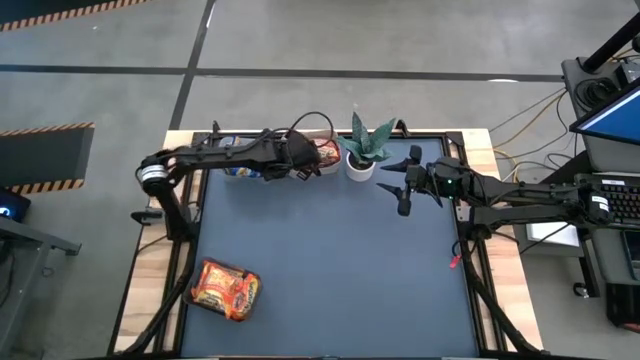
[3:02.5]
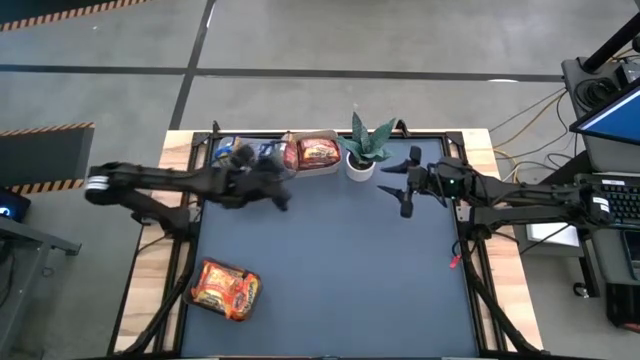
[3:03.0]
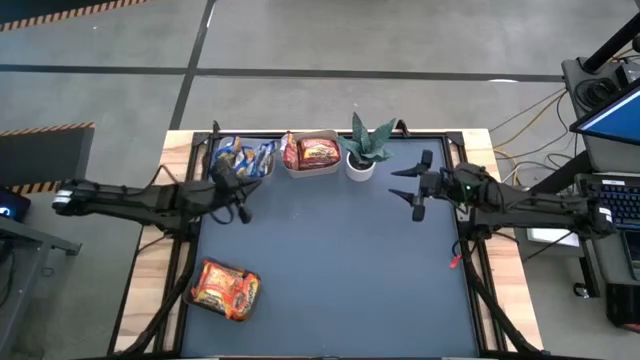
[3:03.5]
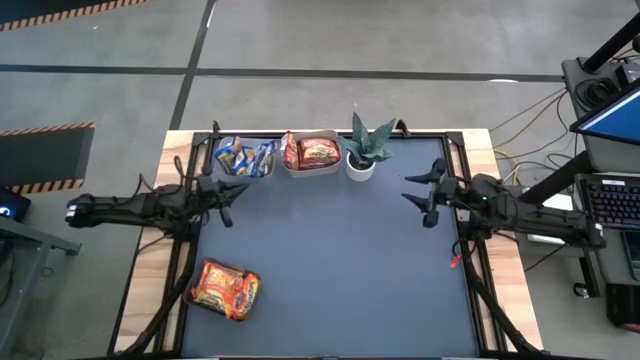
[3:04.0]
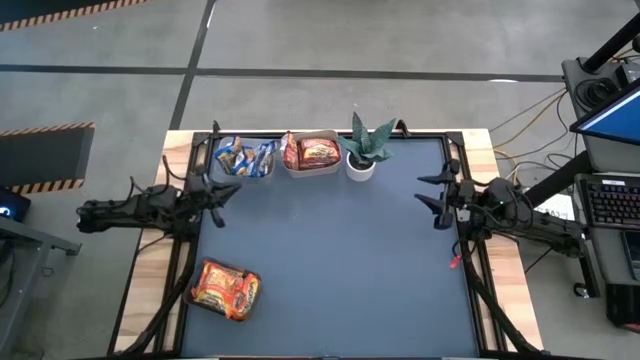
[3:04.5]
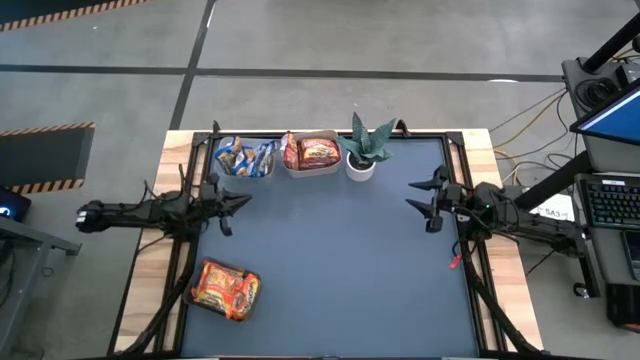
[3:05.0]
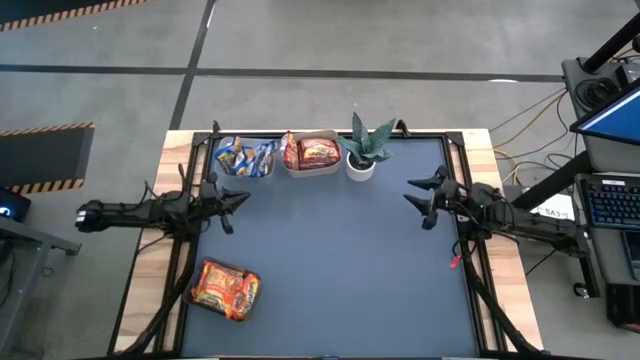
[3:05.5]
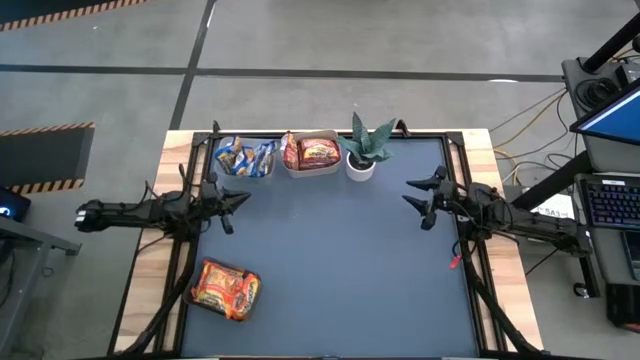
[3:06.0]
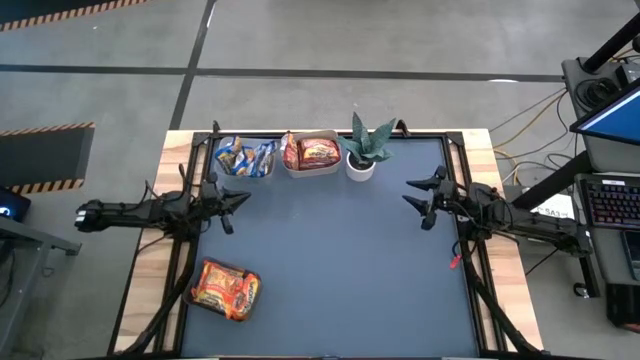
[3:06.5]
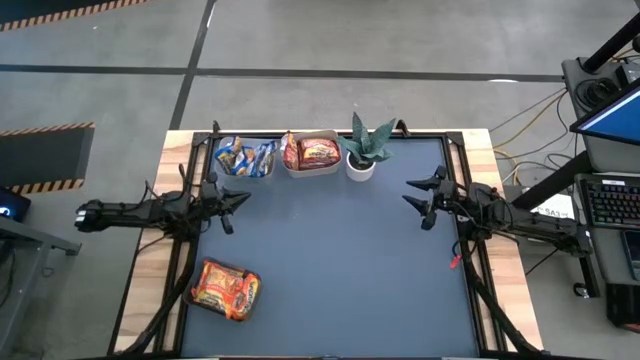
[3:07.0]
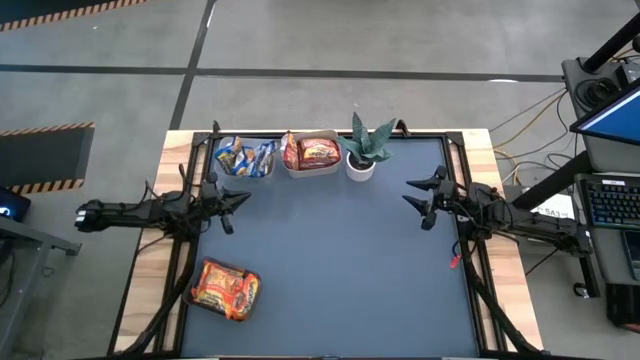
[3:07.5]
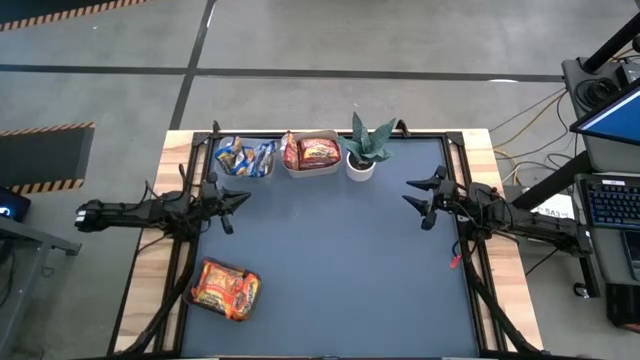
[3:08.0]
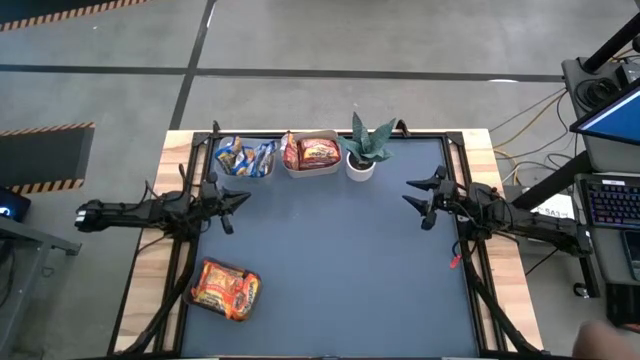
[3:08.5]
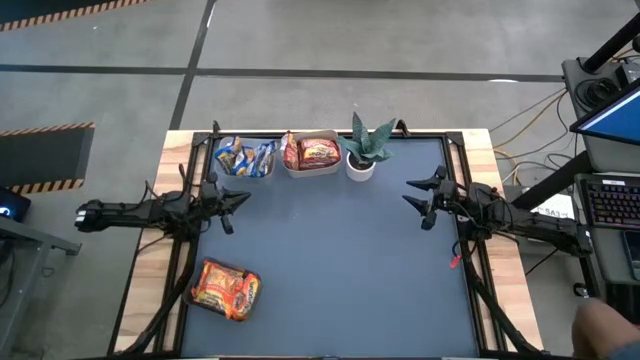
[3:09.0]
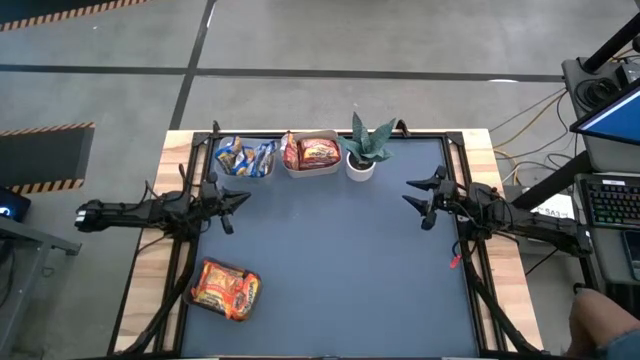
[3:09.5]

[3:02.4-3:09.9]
Task: Sort Maruchan noodles
Return to Home Position

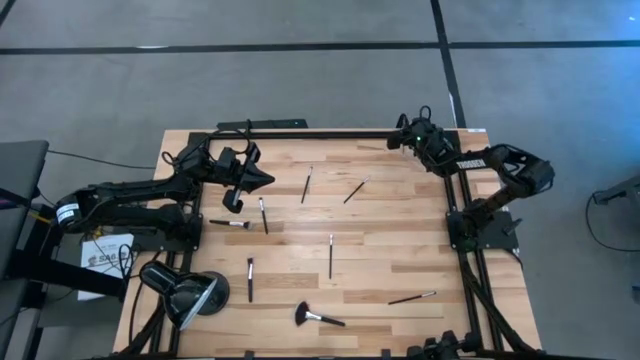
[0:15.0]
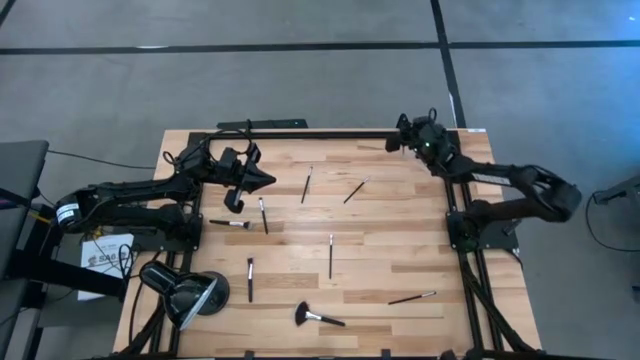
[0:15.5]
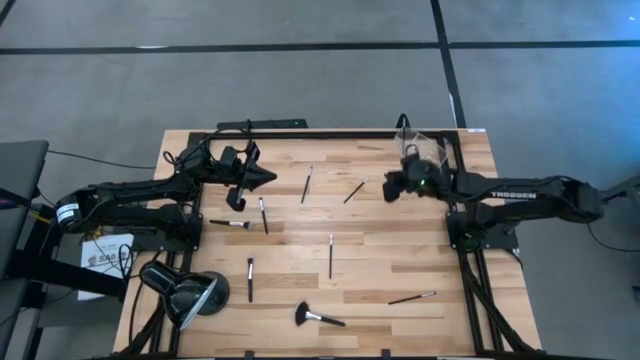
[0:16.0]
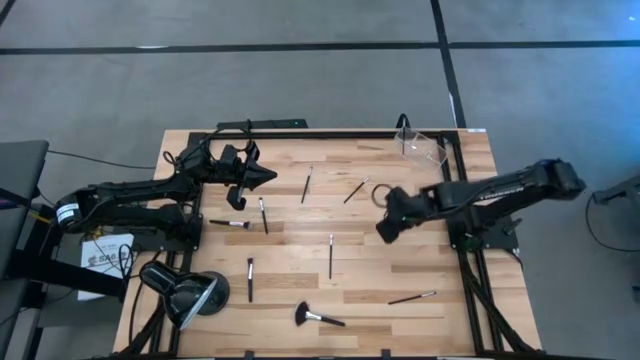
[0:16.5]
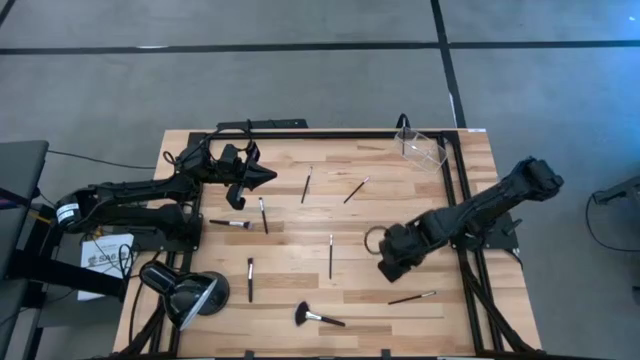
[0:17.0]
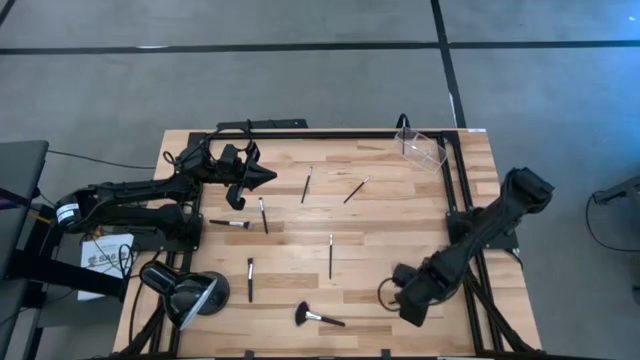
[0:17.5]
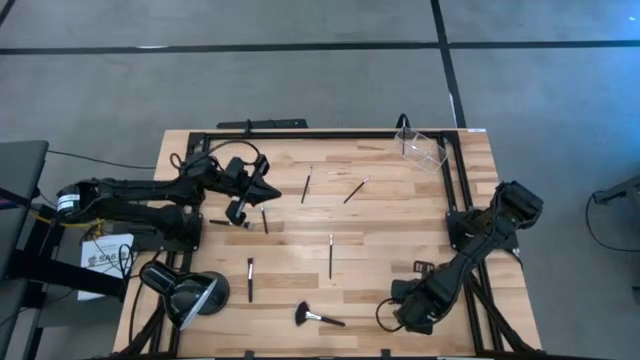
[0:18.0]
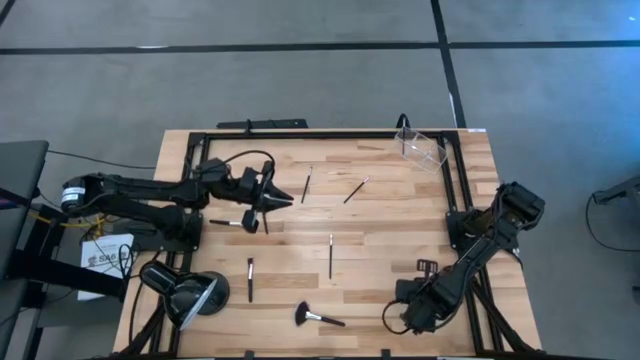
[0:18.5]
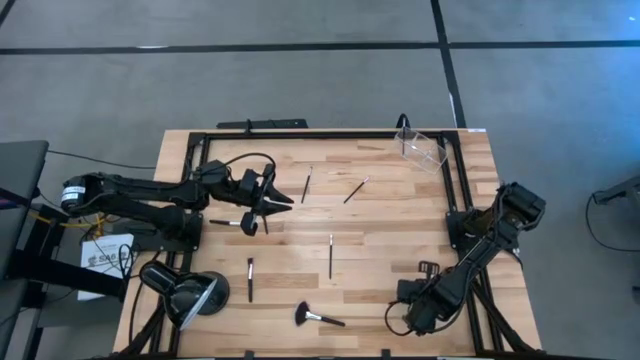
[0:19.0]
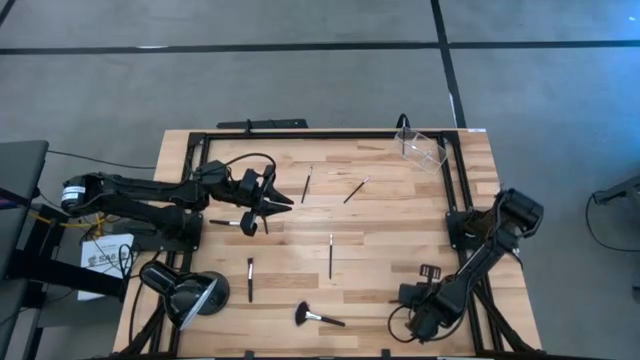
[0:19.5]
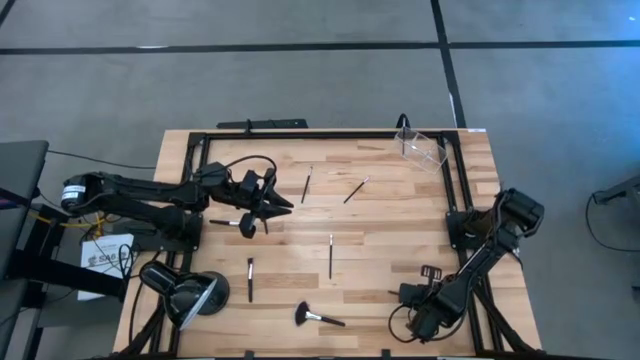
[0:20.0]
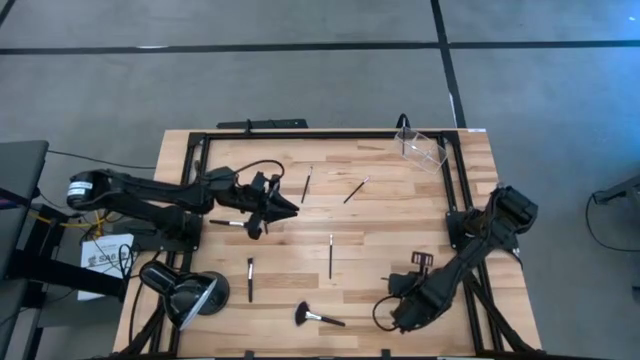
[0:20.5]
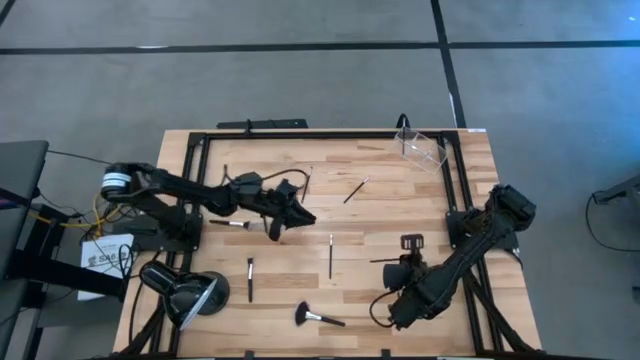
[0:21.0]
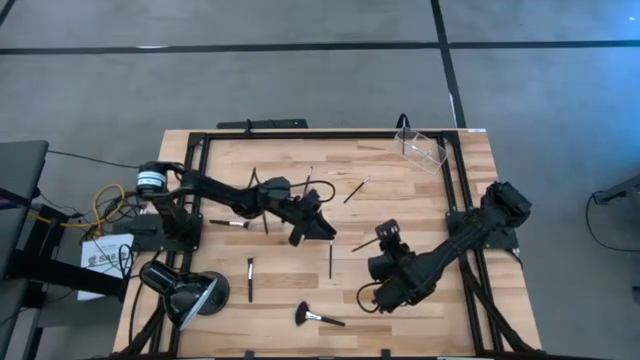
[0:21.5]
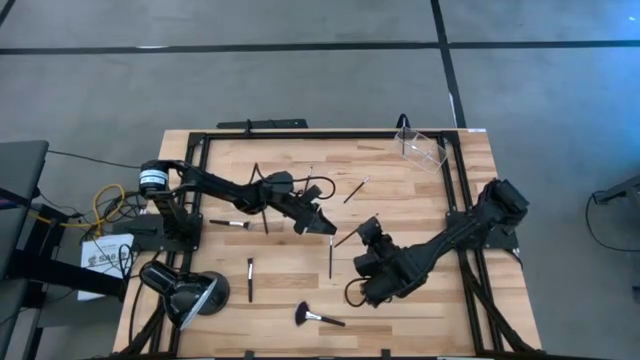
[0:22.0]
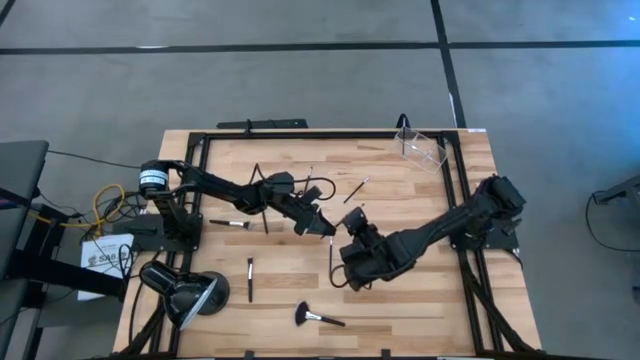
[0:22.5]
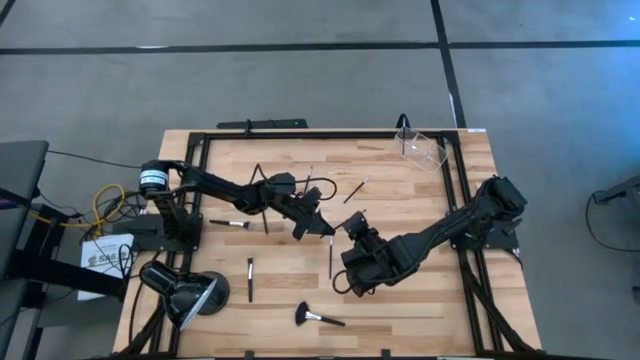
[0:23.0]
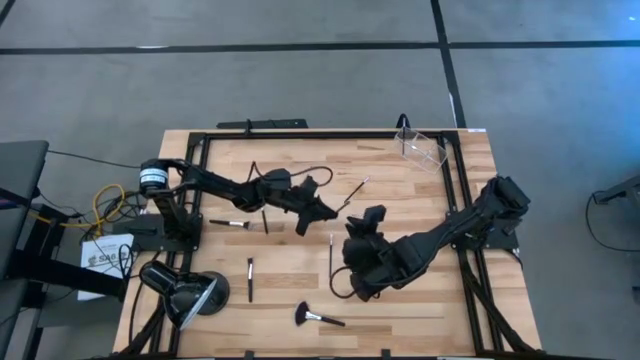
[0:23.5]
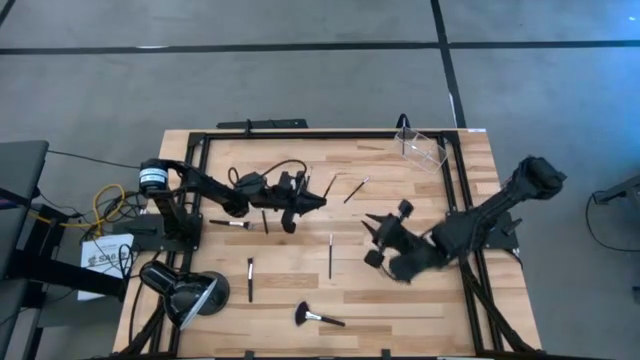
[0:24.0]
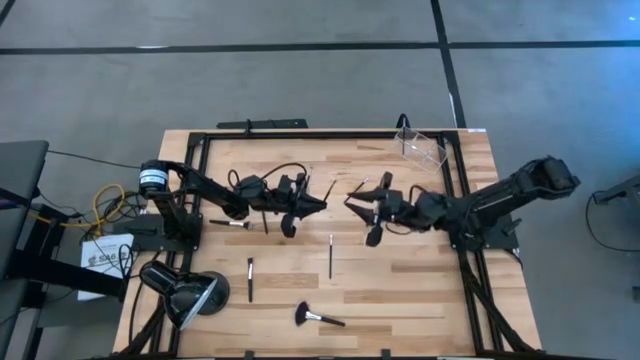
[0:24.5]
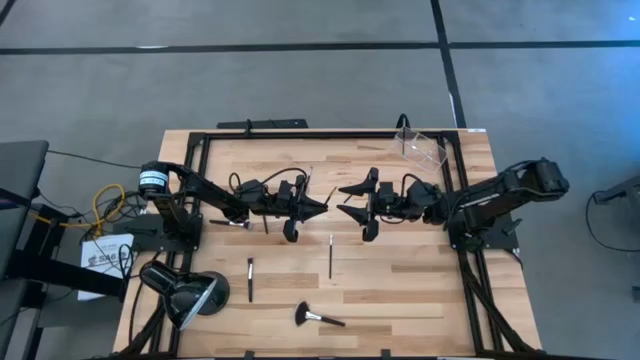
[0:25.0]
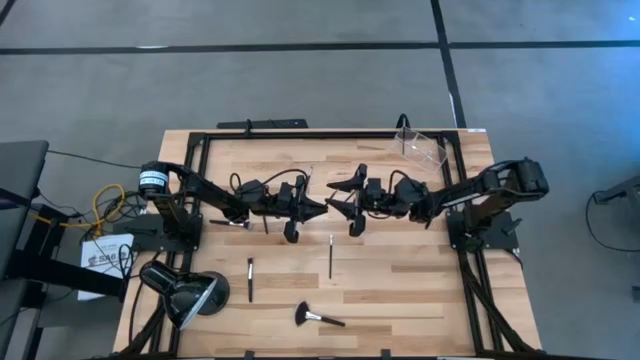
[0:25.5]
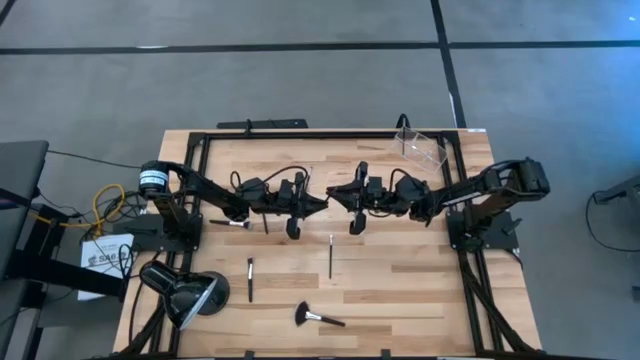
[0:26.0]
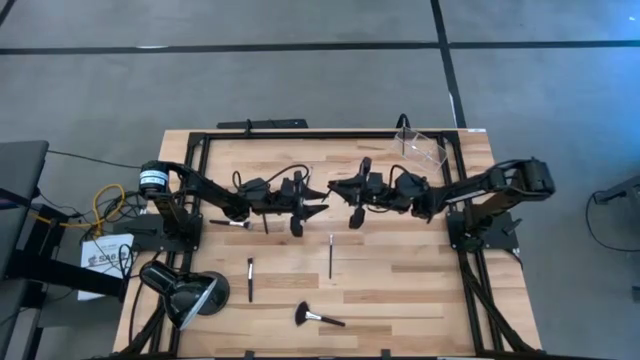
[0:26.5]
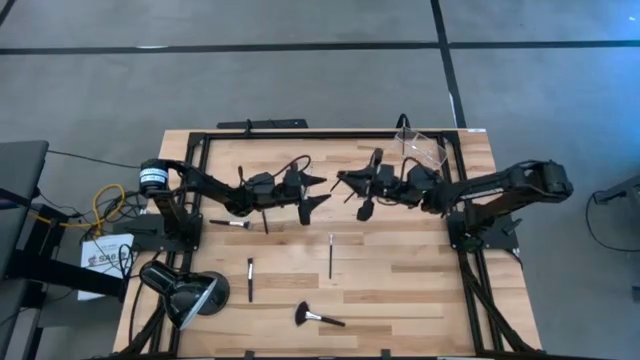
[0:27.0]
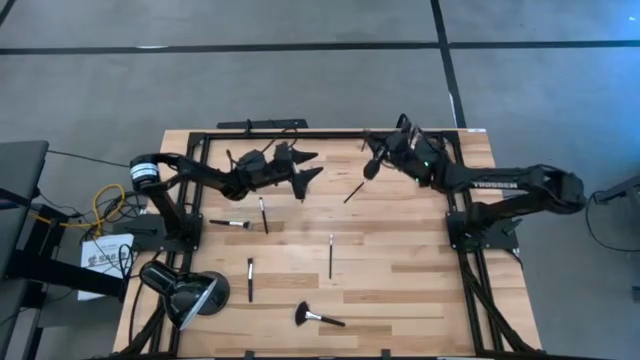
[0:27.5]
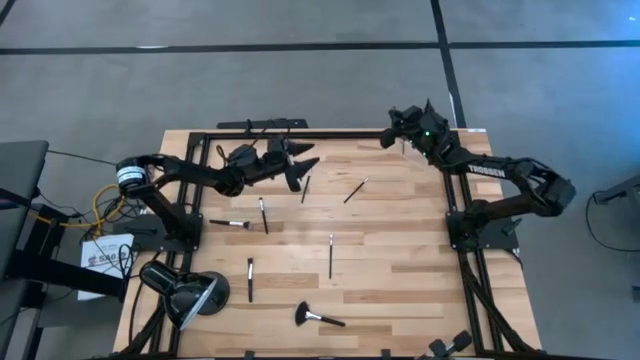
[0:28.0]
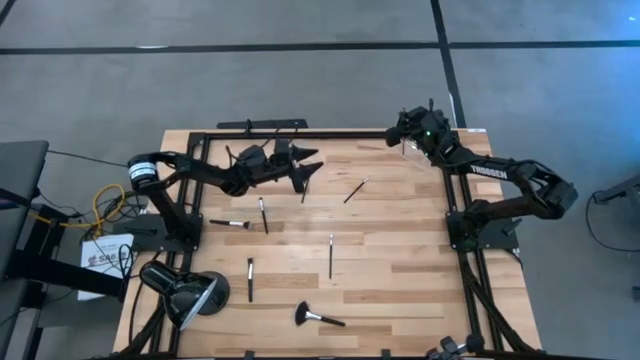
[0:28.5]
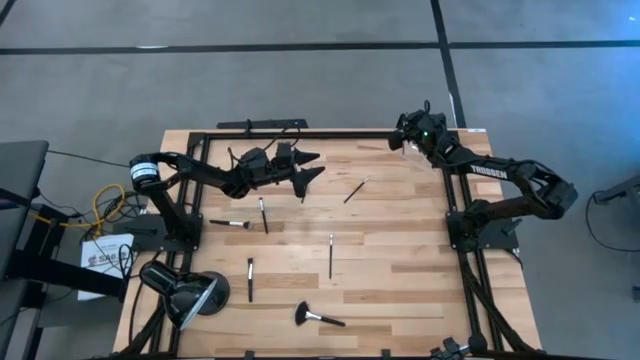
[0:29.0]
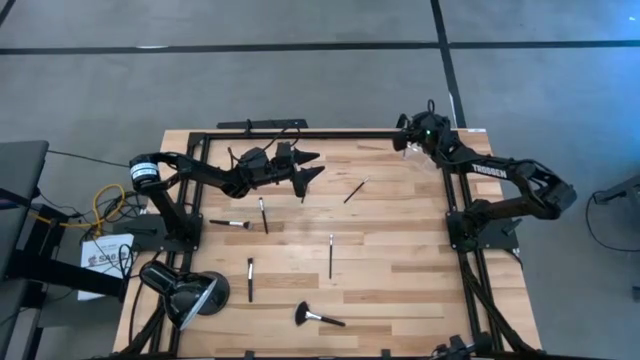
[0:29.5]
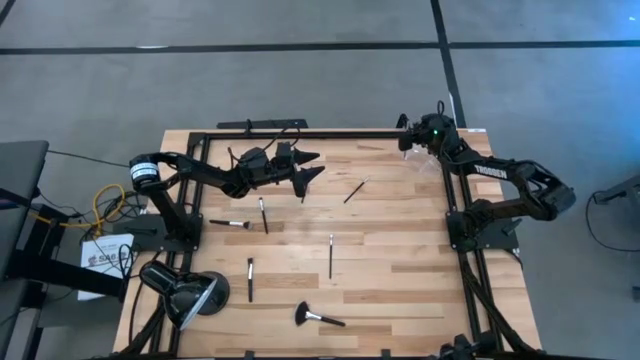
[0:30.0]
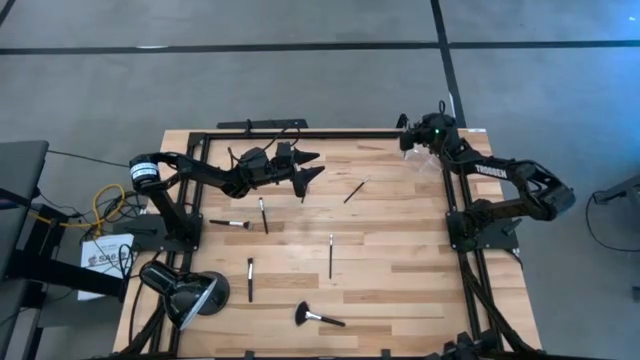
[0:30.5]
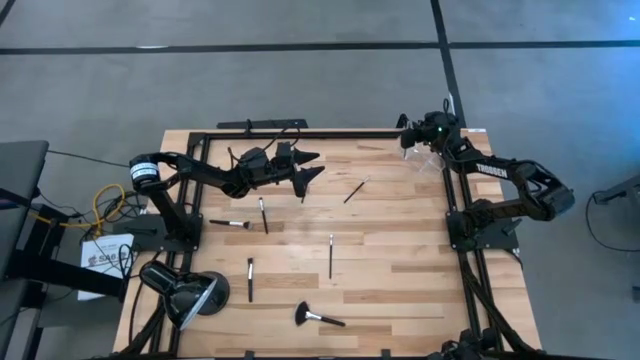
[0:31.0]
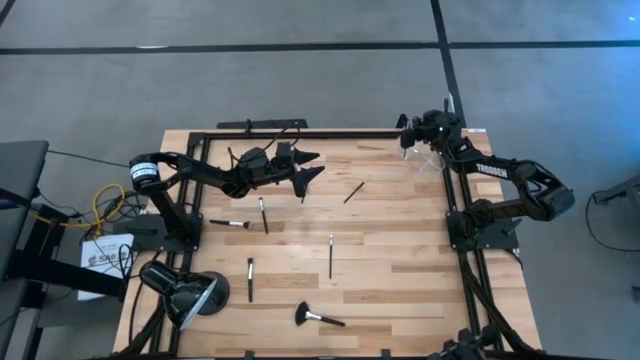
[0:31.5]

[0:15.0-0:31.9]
Task: Put items in baskets/containers
Put the black eyeshadow brush into the transparent organizer
